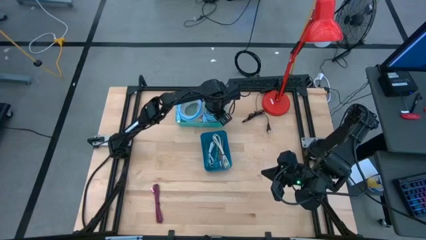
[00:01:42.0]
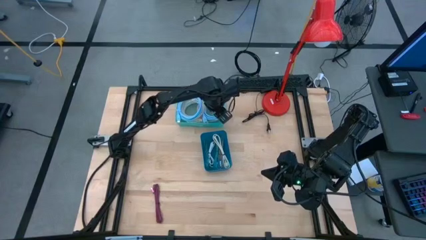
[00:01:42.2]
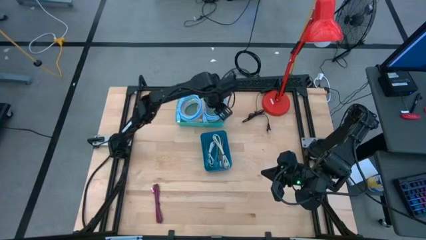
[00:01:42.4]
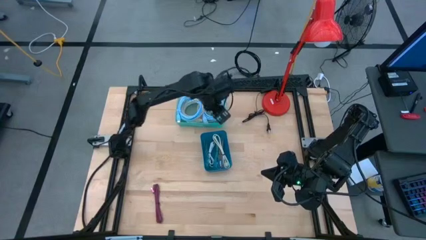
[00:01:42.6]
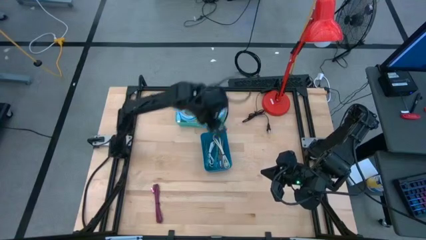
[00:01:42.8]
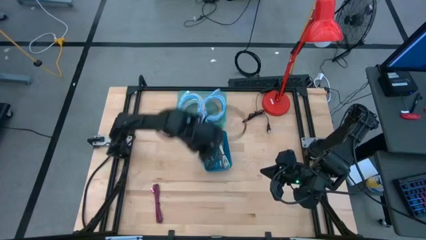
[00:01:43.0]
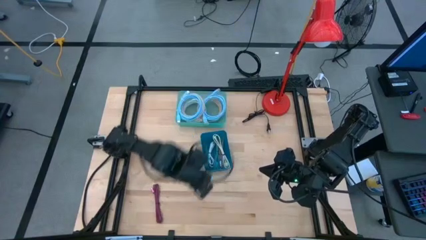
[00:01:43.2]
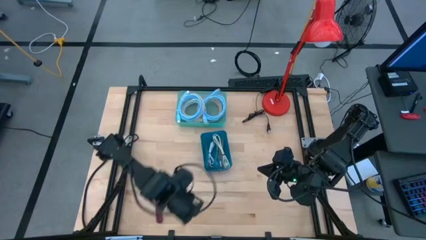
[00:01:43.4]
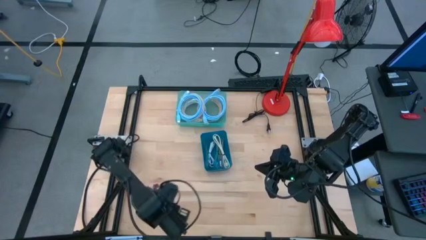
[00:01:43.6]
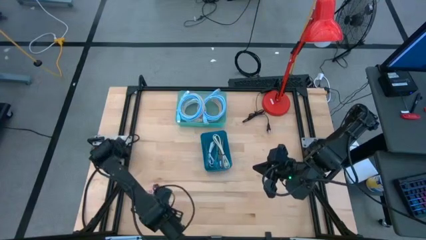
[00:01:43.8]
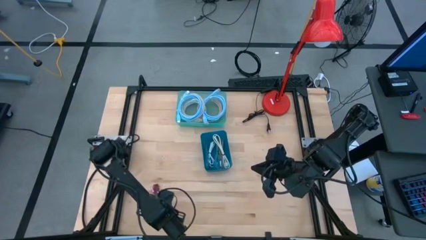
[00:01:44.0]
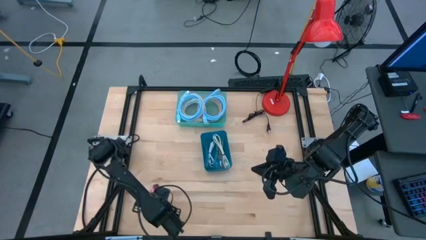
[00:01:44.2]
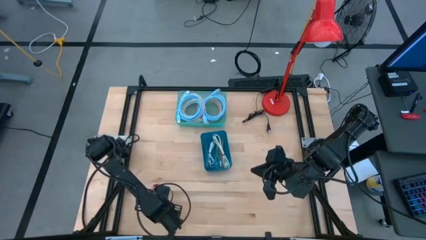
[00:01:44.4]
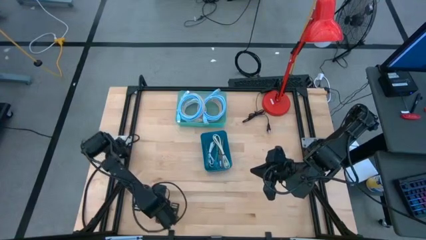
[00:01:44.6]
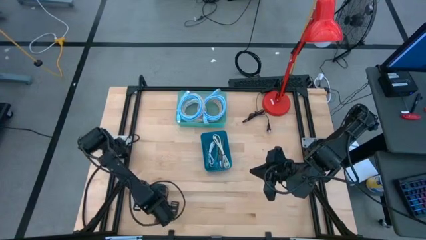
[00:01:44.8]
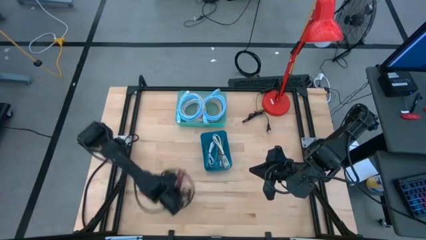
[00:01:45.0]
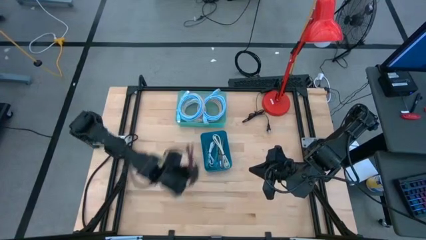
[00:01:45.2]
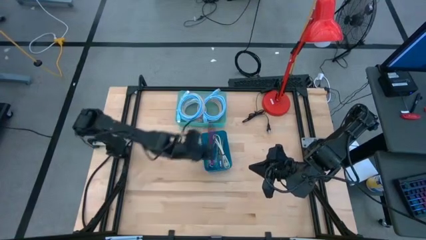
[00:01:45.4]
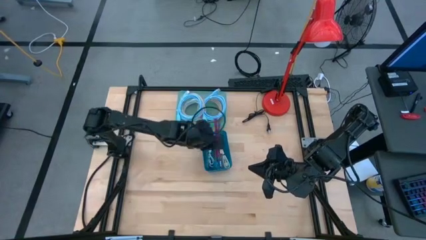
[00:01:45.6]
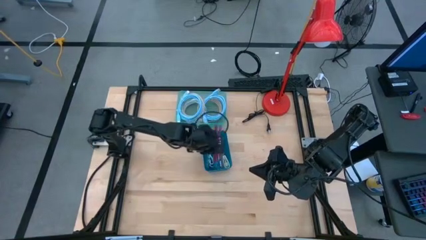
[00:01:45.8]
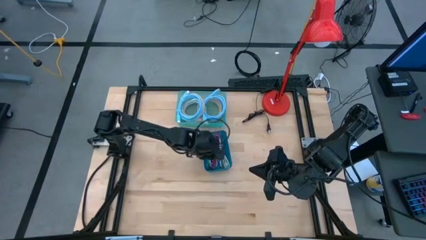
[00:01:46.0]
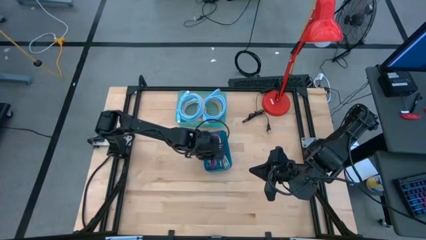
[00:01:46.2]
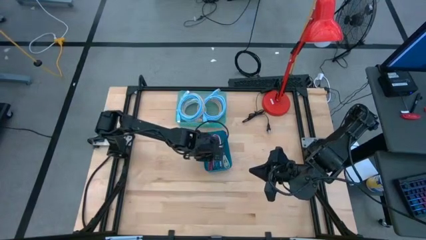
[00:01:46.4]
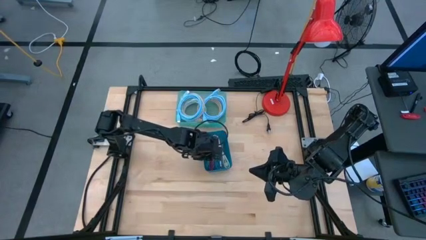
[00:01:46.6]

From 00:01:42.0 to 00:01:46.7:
Task: Pick & Place USB Port
Put the pink charger cable into the blue bin

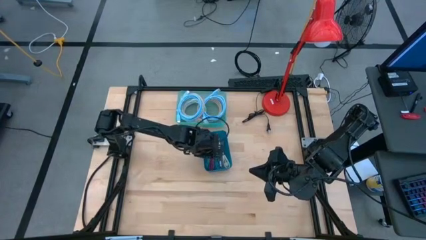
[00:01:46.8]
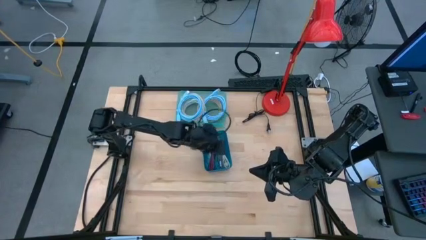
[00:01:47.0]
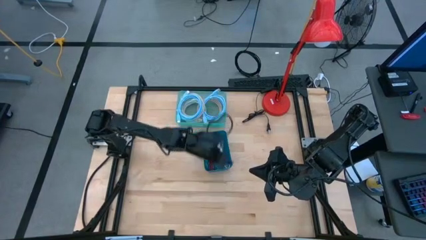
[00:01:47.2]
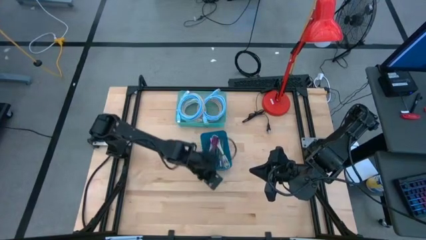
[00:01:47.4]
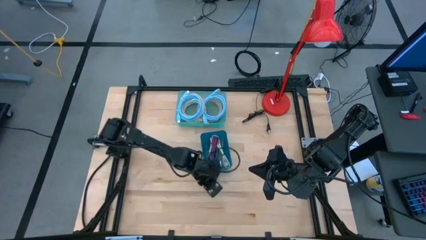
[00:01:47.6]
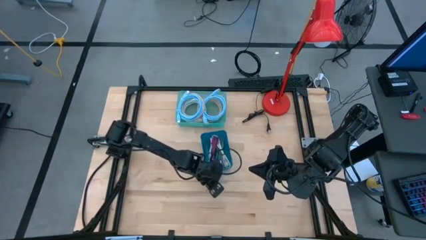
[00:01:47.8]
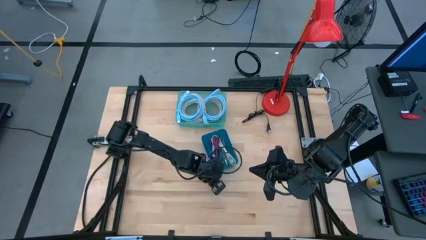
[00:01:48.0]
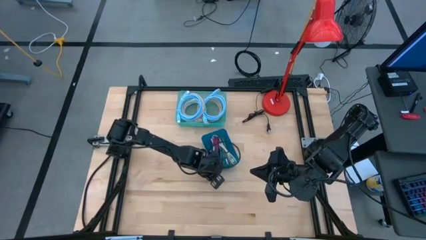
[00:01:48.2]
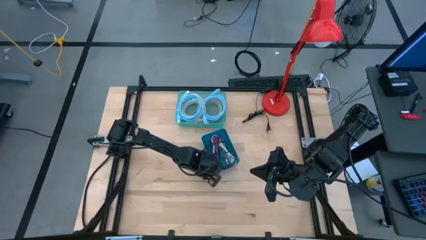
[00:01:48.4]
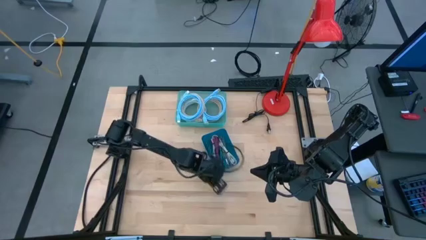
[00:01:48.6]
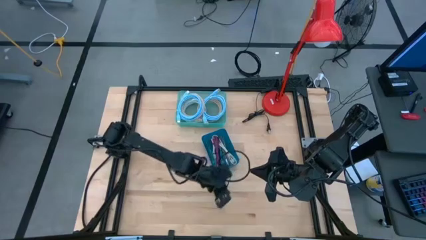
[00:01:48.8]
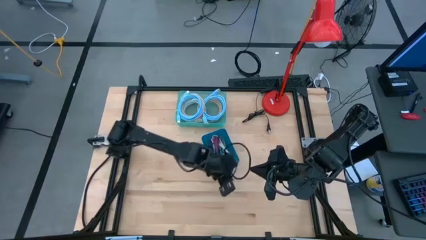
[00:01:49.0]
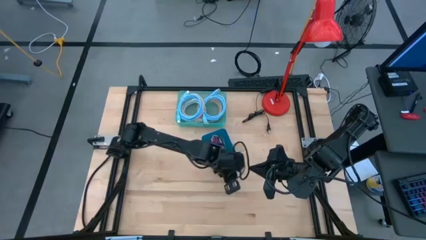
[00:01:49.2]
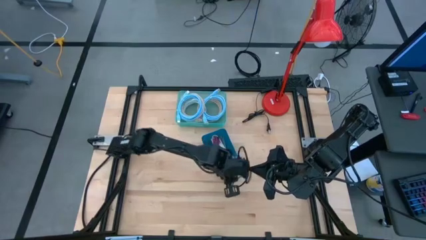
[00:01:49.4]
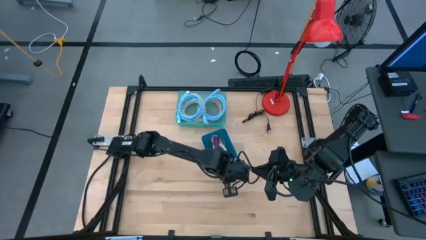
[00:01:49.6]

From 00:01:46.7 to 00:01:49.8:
Adjust the blue bin on the table

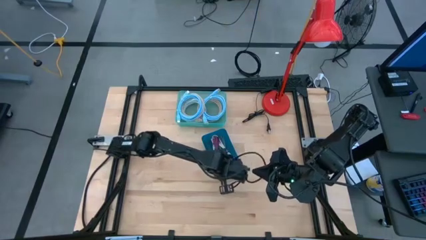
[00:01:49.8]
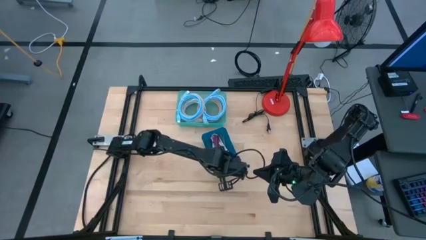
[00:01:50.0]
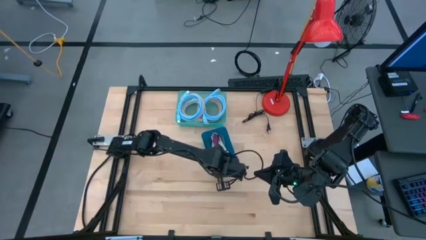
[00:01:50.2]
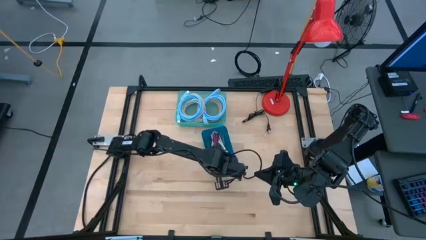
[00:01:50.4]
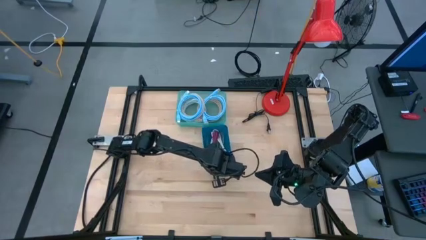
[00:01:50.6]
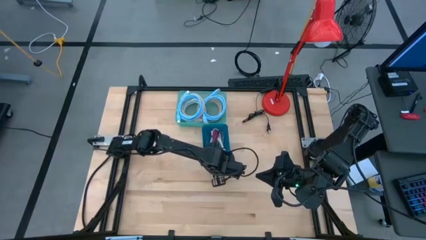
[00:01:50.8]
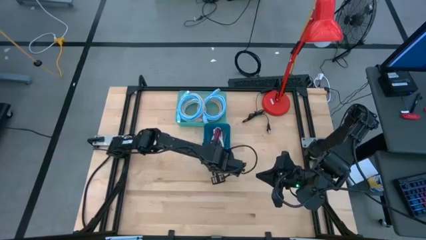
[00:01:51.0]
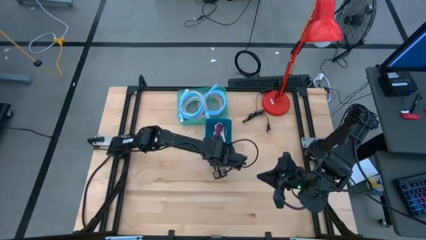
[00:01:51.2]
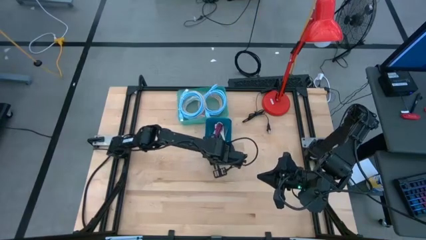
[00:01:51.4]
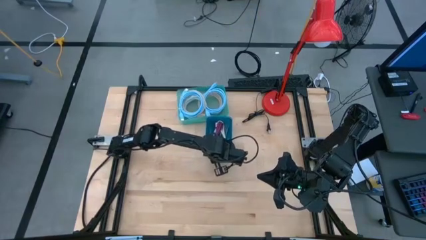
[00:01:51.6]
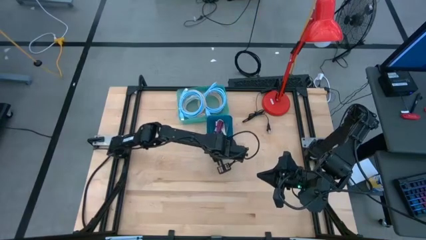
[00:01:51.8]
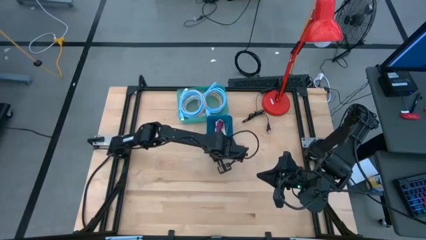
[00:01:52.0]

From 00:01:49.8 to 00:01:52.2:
Adjust the blue bin on the table

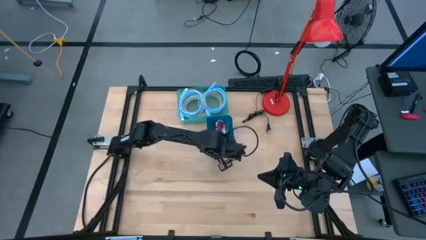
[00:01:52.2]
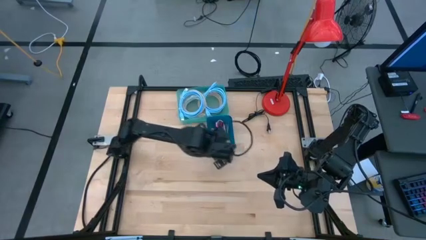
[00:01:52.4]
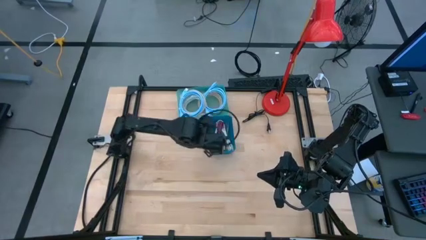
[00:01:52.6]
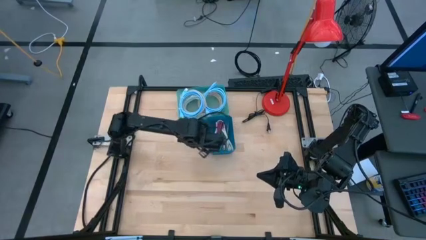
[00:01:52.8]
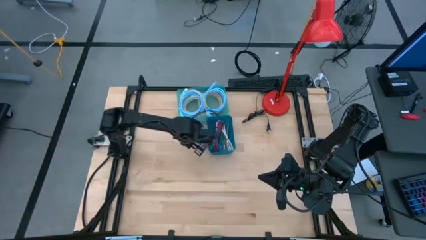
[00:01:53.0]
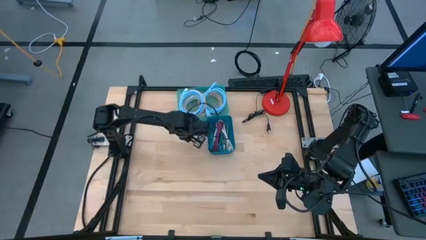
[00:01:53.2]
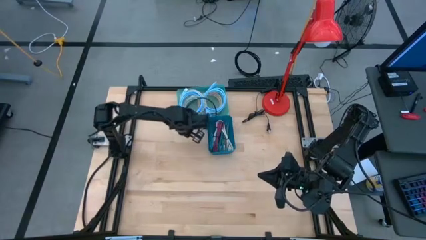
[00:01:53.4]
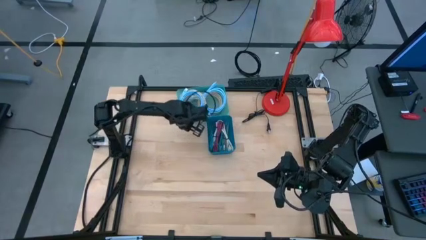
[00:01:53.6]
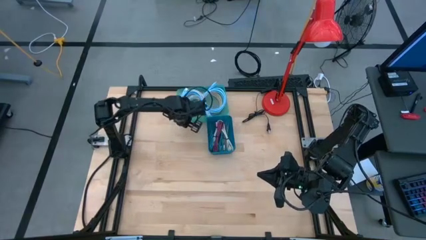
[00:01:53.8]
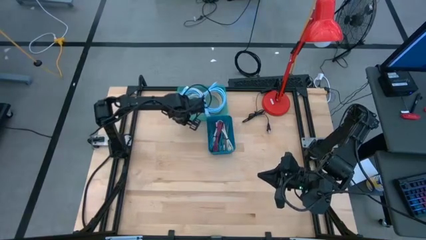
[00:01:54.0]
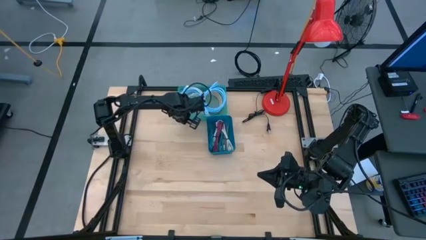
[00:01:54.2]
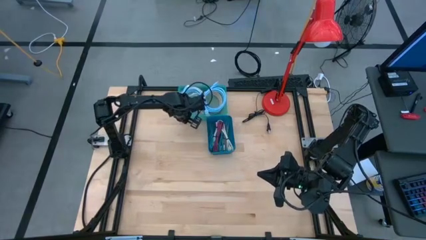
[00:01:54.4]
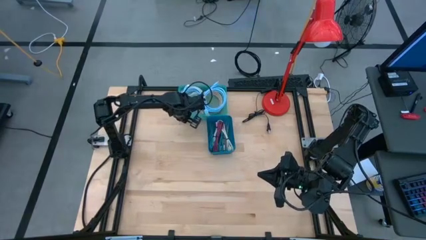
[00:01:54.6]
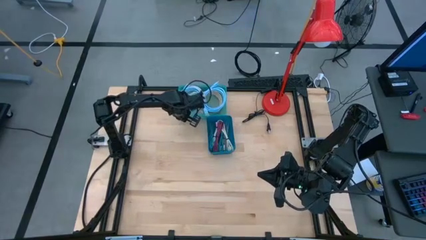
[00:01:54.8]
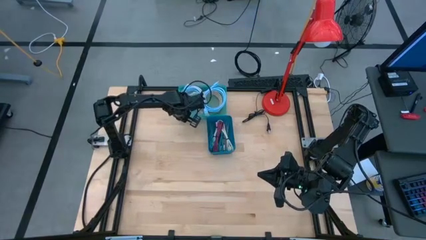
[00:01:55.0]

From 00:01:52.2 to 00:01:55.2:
Adjust the green bin on the table

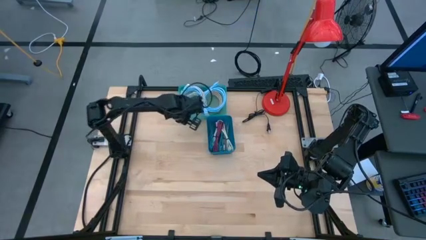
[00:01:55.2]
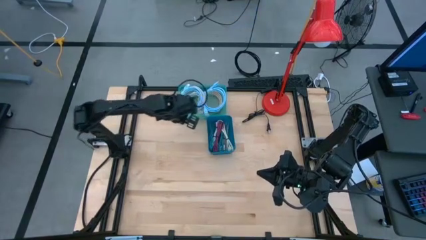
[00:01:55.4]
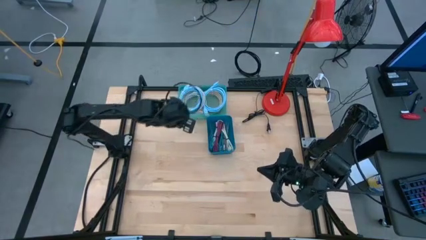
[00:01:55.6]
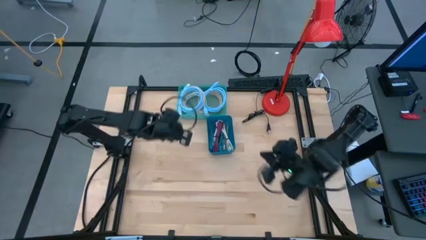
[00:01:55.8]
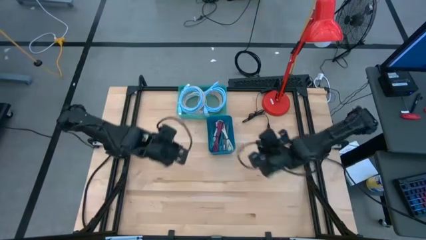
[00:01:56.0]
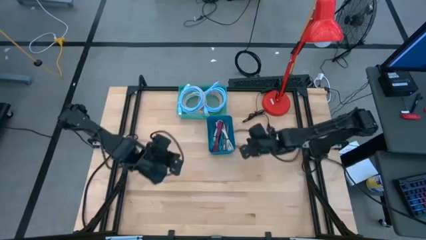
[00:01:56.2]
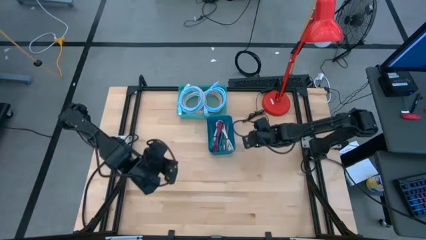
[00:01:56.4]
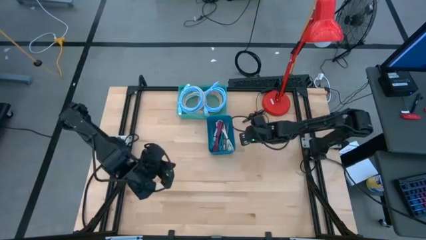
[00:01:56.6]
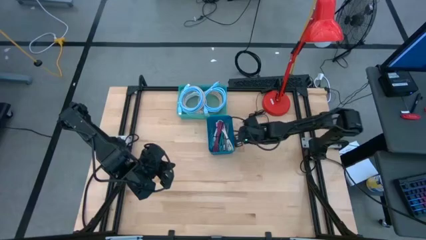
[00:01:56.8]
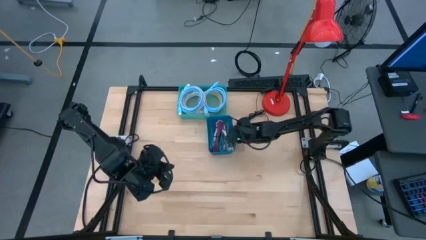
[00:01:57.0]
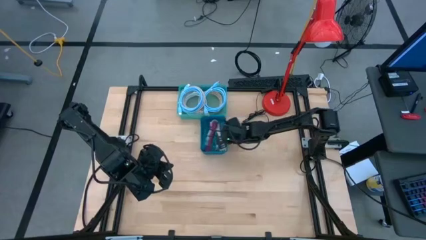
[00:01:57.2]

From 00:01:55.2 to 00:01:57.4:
Adjust the blue bin on the table
